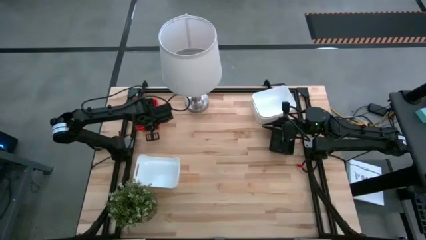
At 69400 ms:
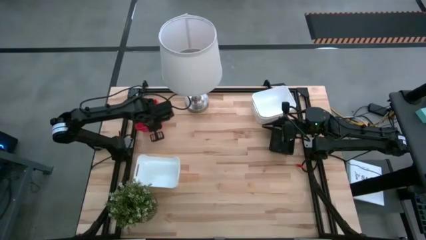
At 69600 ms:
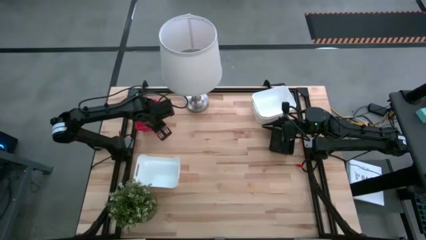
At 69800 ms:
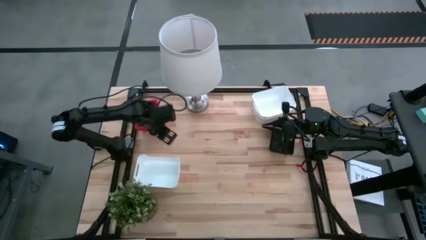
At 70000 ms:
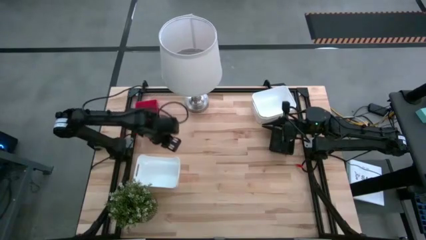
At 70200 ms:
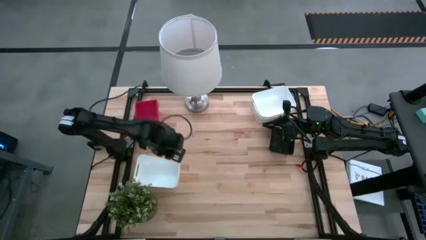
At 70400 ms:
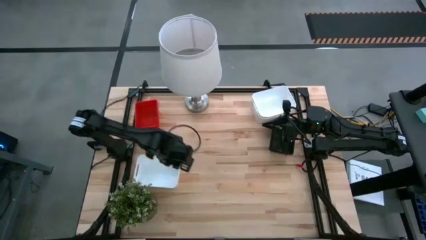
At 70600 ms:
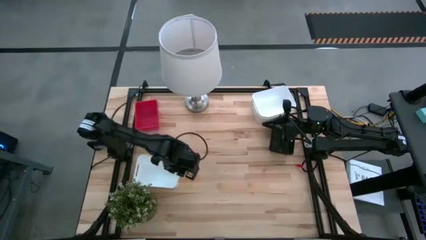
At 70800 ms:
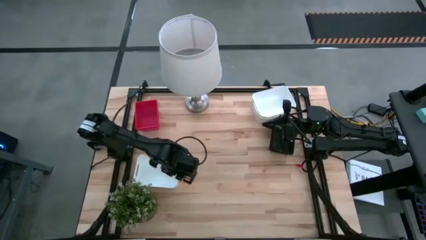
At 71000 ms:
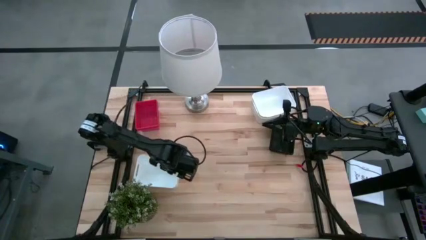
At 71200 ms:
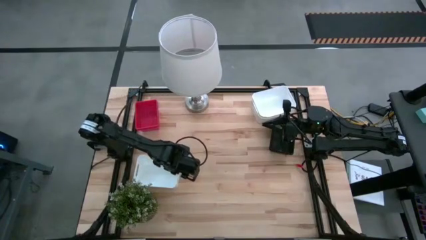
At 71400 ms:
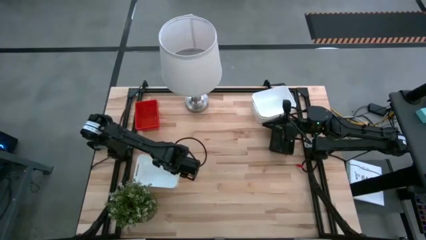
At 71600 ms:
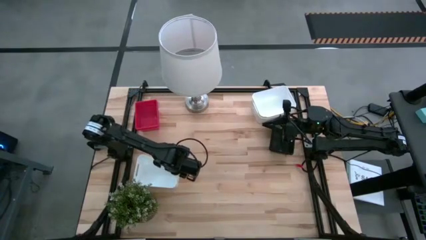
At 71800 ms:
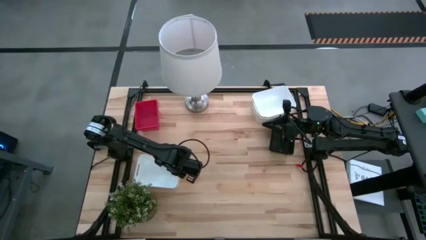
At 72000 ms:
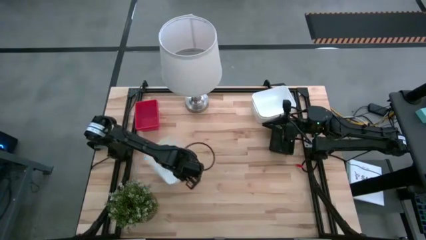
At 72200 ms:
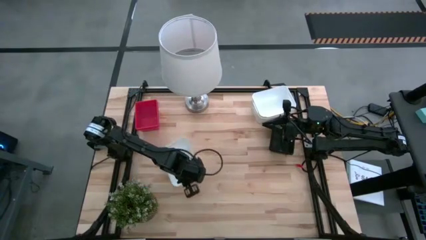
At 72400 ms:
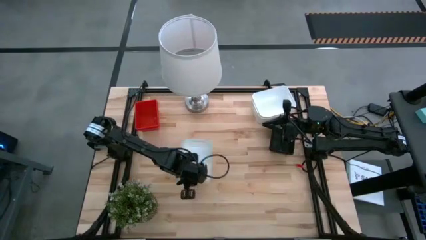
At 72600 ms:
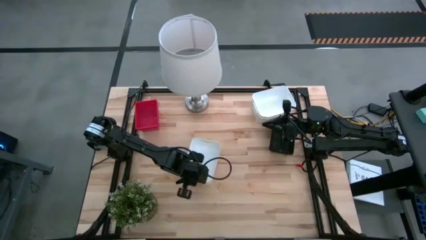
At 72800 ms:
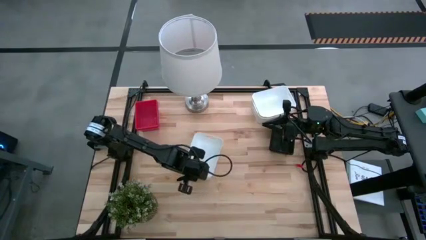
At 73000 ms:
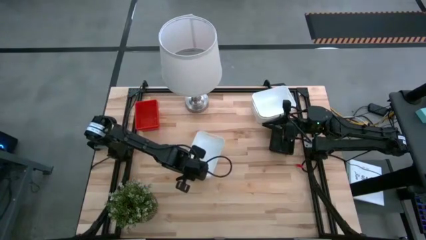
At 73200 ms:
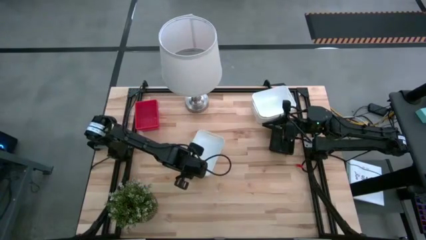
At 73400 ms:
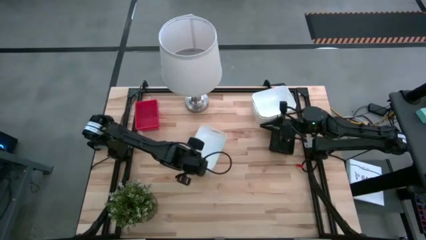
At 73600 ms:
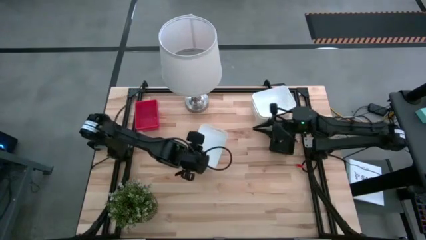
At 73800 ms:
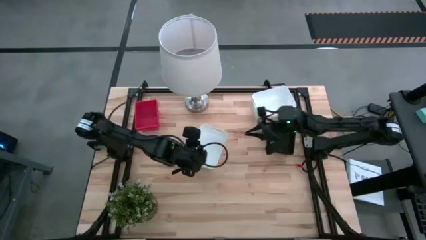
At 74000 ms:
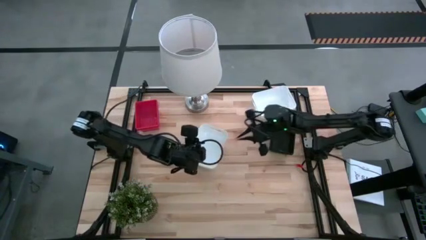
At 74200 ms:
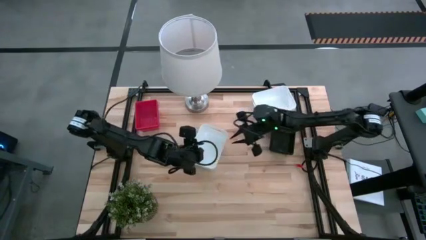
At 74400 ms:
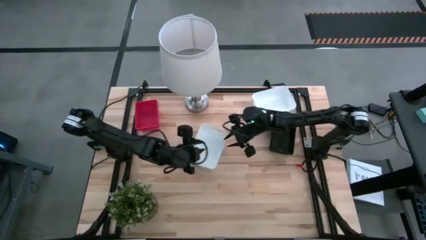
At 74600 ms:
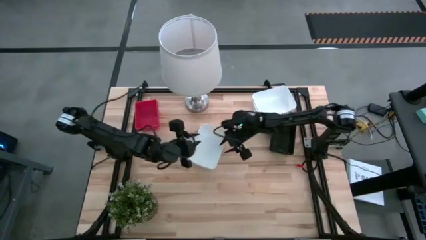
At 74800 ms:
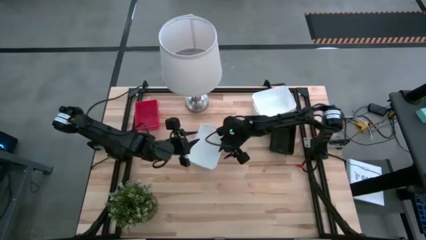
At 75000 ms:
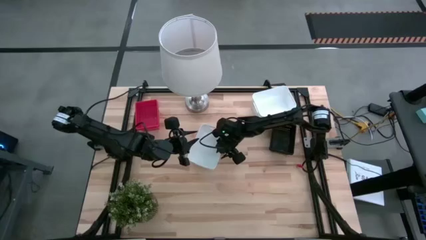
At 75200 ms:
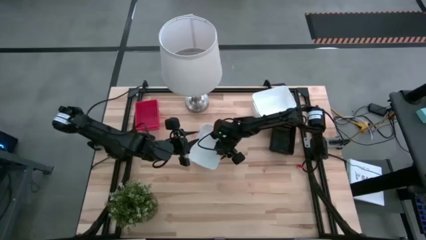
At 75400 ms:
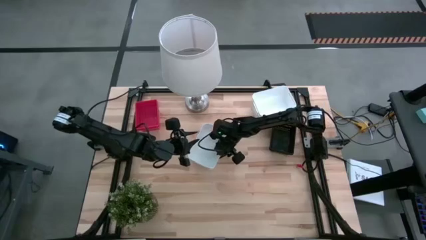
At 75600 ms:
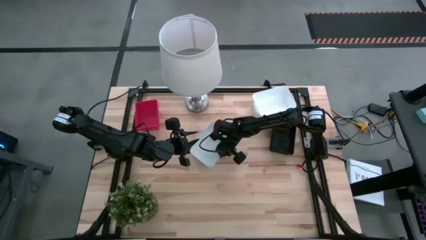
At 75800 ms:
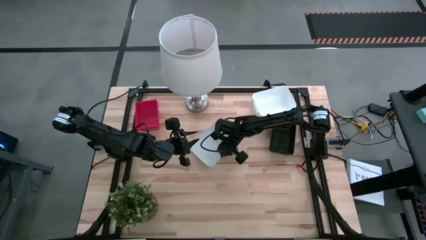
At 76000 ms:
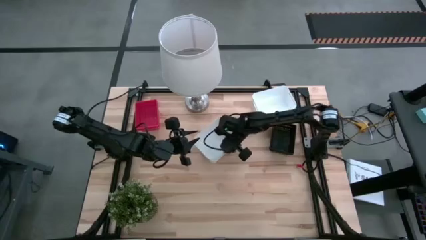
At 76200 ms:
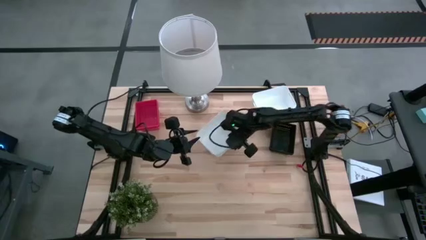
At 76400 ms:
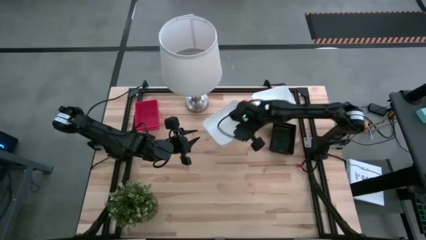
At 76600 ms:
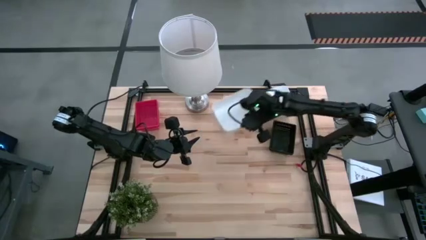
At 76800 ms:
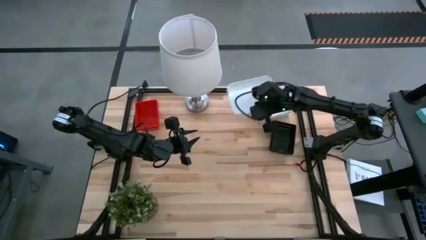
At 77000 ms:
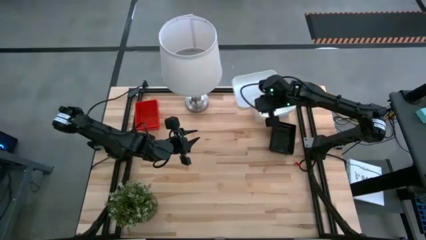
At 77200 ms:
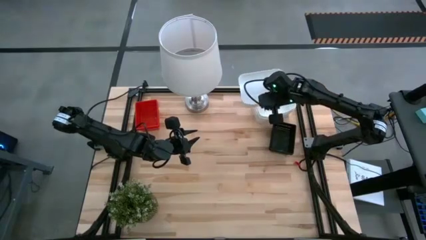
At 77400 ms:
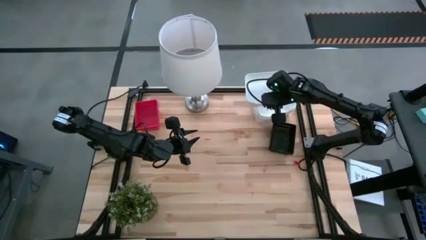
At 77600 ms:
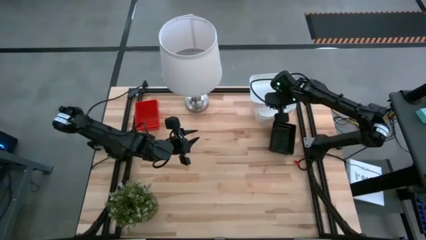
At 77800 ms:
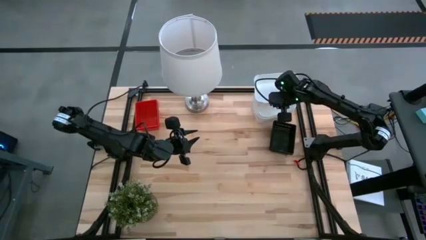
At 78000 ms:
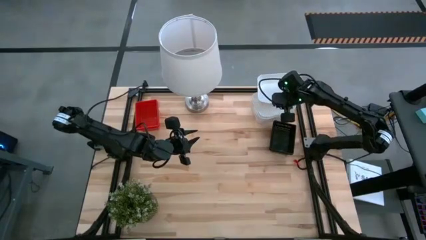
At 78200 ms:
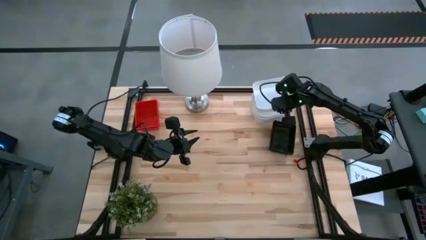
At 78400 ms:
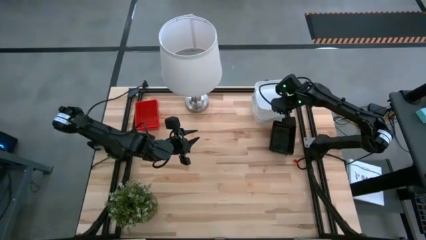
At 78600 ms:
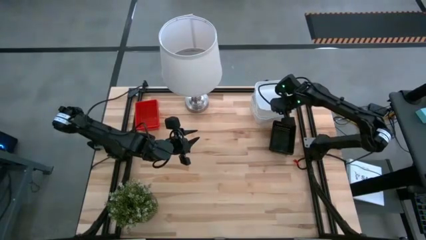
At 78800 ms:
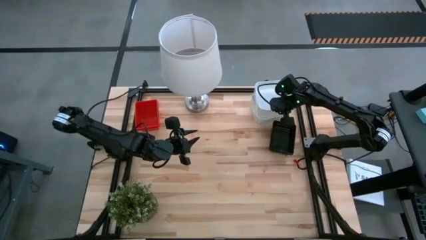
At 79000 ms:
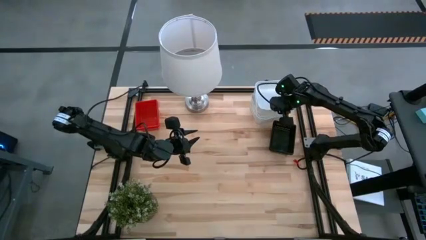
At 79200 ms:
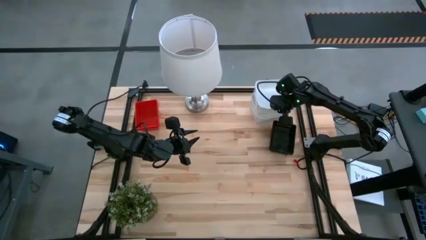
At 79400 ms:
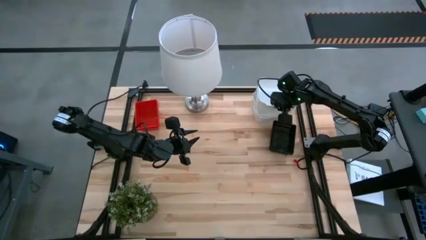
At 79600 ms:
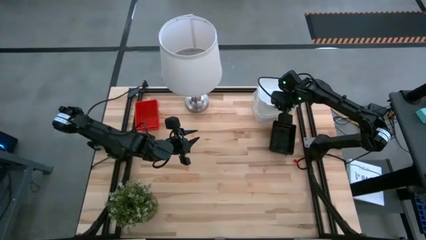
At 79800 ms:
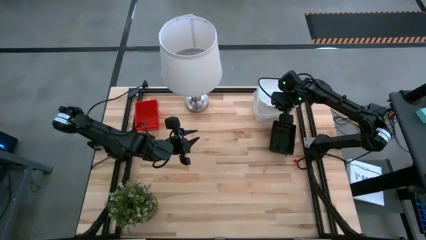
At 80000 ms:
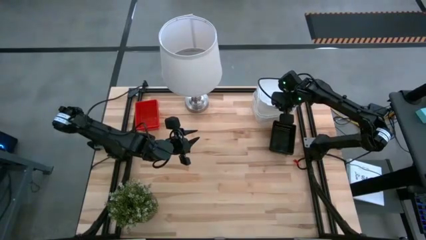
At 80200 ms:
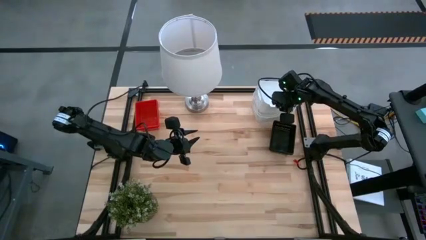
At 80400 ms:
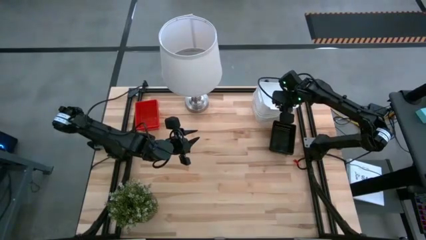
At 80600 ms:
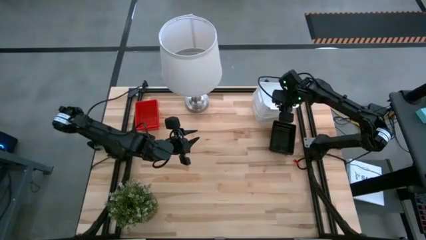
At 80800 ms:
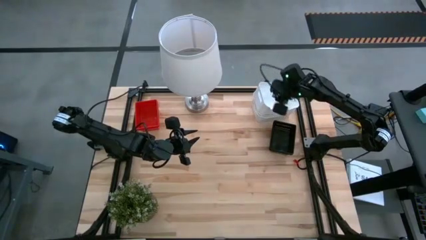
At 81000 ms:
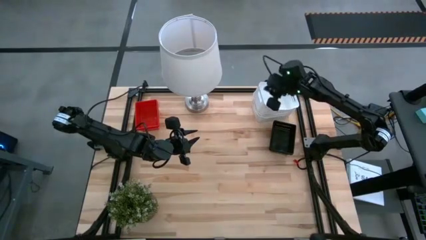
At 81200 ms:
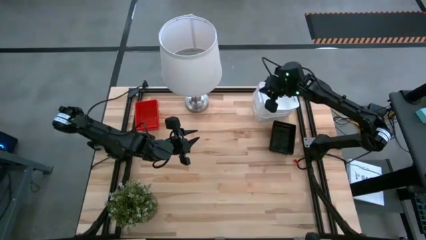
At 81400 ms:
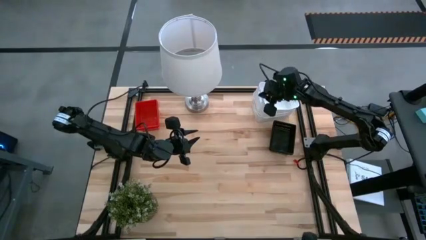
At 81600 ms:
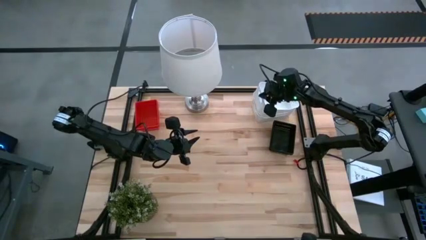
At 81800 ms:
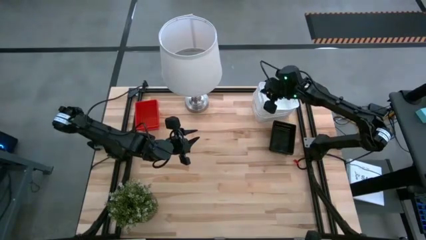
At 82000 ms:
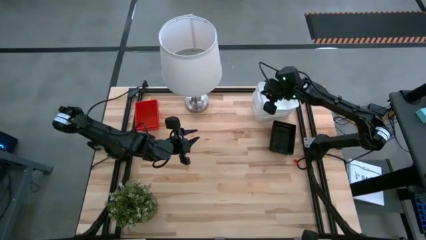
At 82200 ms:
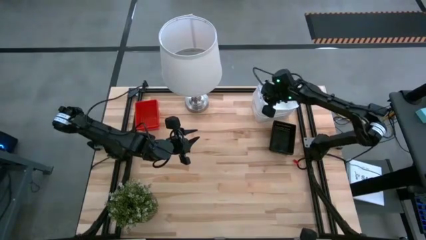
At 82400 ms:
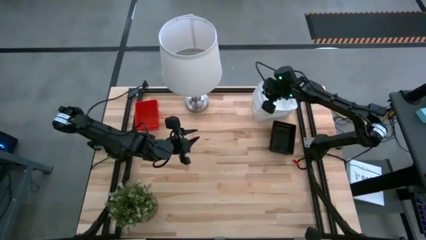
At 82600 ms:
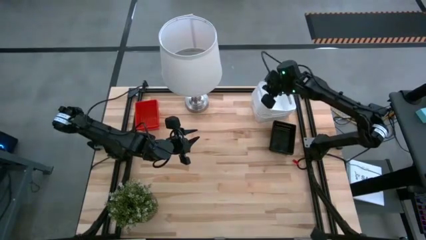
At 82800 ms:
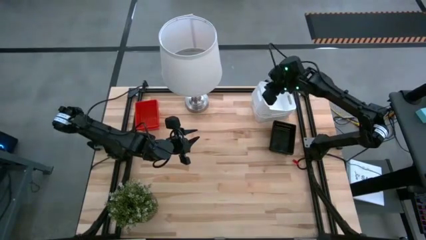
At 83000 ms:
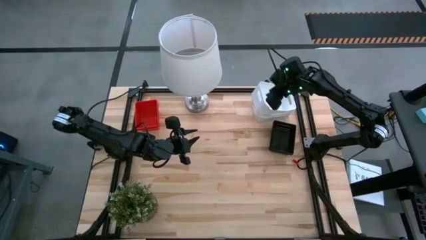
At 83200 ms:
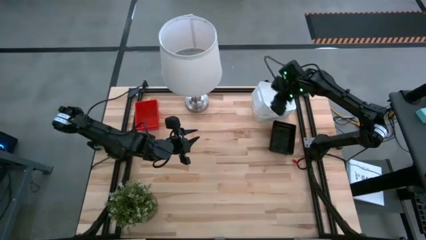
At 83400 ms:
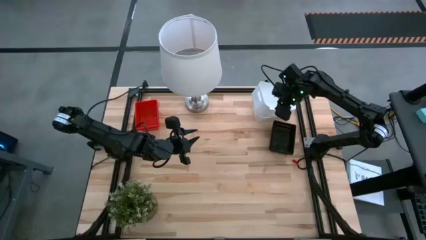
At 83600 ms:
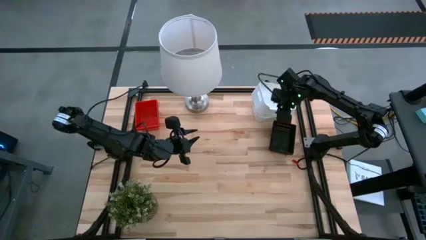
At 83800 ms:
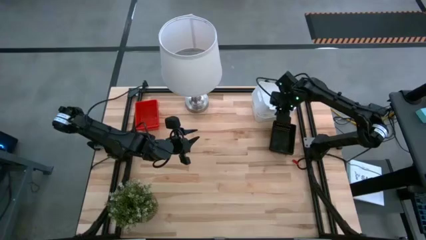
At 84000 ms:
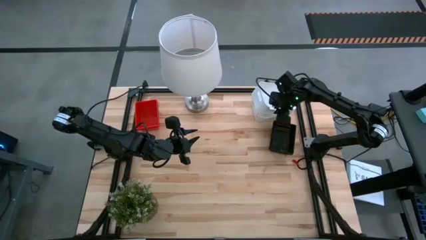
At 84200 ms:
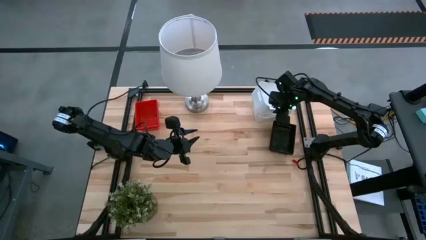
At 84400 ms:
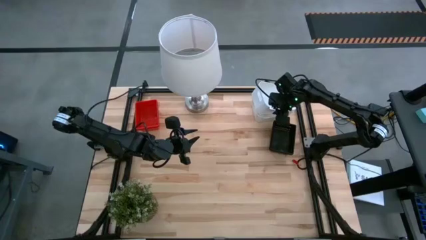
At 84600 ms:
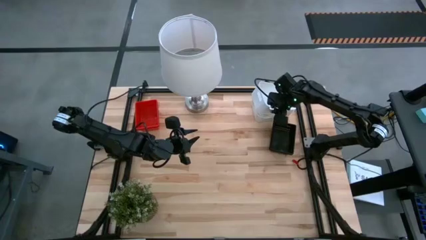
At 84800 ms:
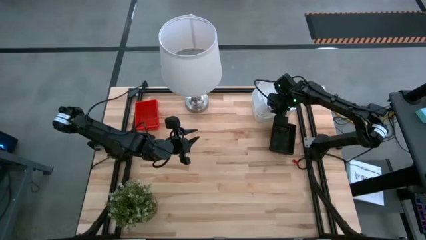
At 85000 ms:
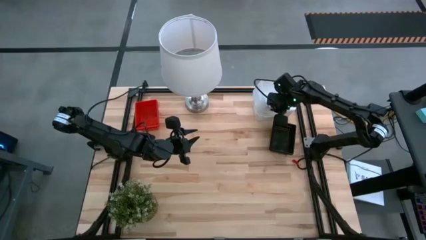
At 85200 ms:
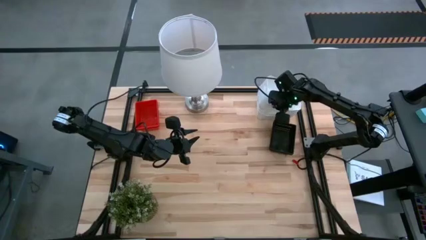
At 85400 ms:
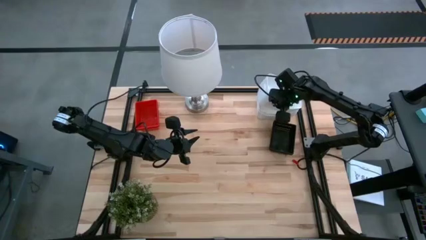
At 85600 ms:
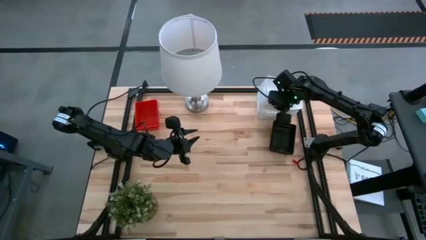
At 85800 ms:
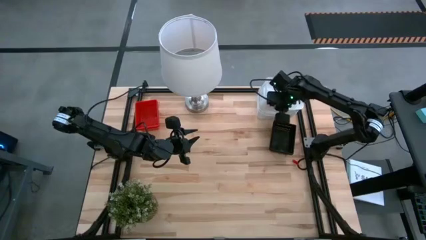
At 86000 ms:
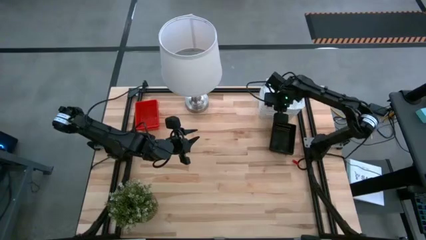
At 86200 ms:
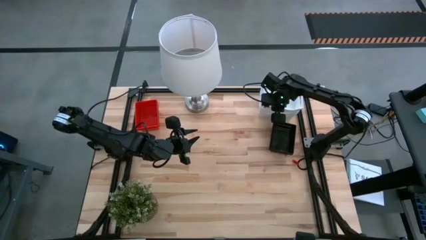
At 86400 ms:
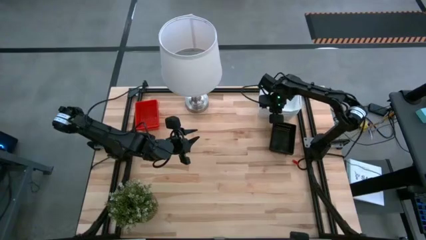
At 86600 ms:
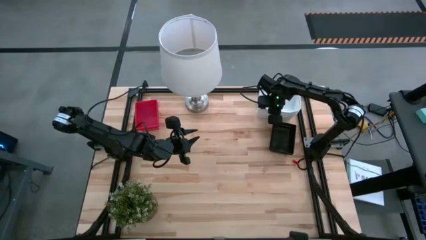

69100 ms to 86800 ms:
Stack the left white bin on top of the stacked white bins
